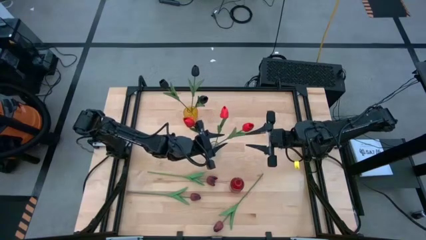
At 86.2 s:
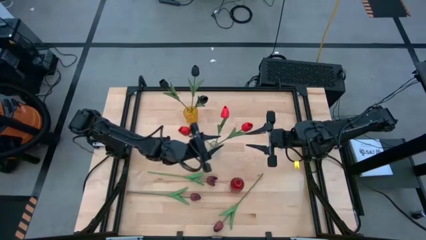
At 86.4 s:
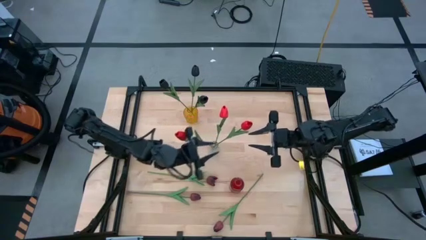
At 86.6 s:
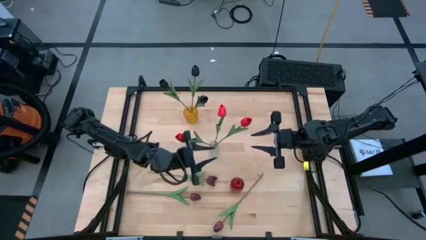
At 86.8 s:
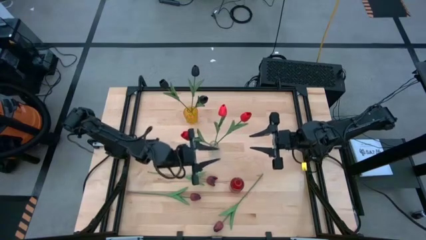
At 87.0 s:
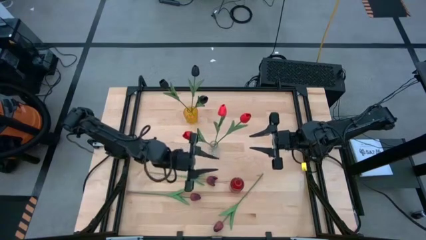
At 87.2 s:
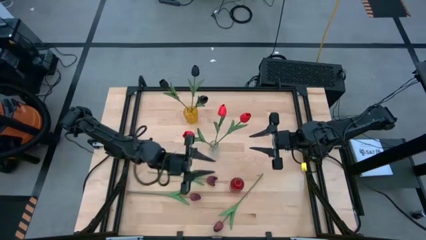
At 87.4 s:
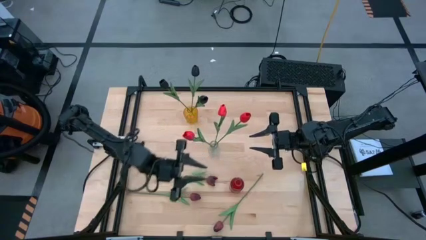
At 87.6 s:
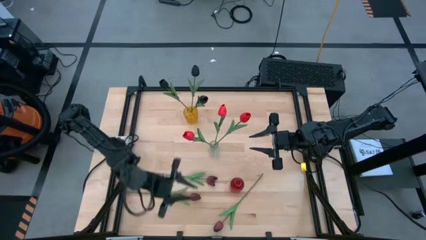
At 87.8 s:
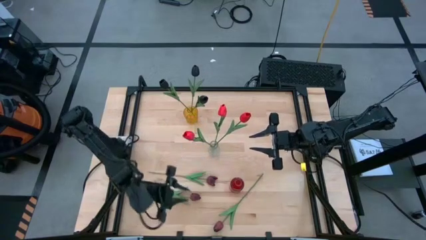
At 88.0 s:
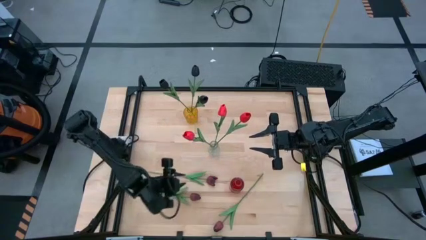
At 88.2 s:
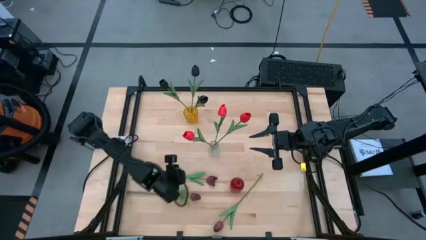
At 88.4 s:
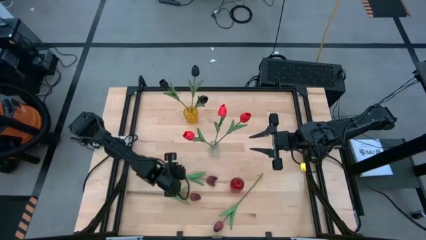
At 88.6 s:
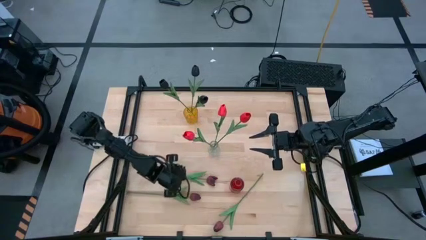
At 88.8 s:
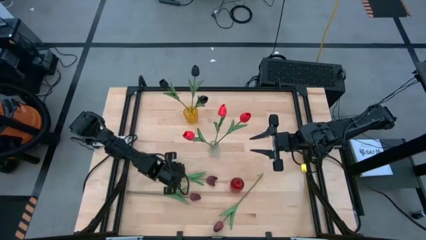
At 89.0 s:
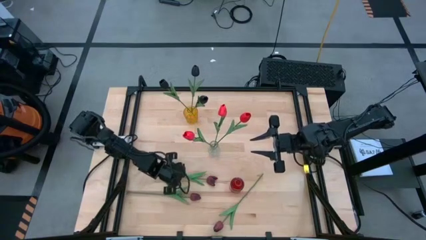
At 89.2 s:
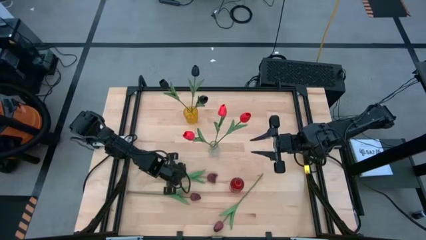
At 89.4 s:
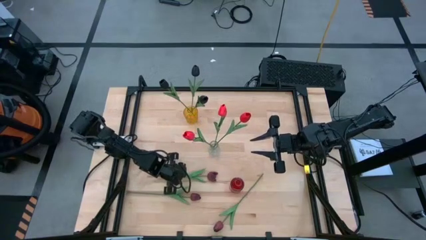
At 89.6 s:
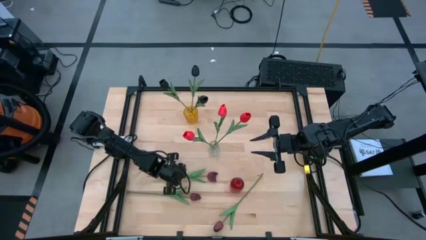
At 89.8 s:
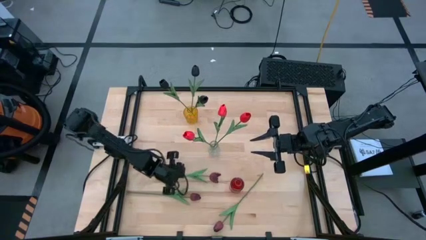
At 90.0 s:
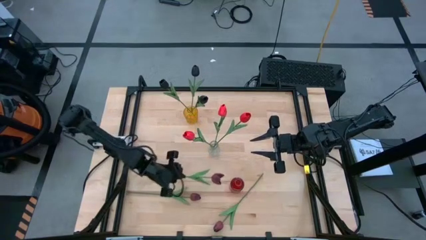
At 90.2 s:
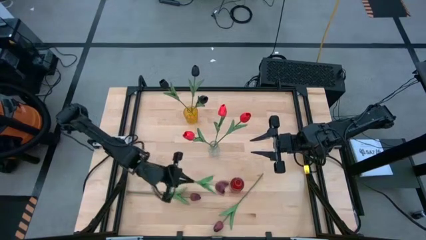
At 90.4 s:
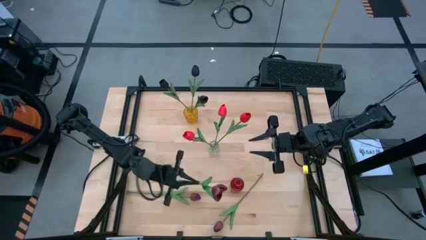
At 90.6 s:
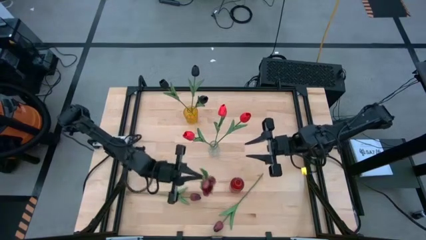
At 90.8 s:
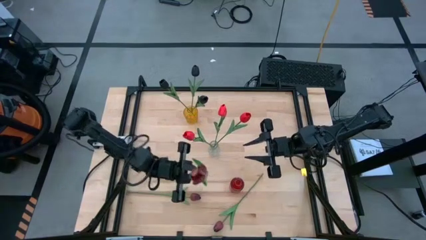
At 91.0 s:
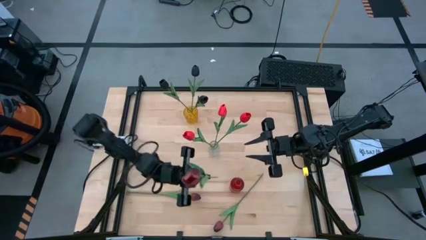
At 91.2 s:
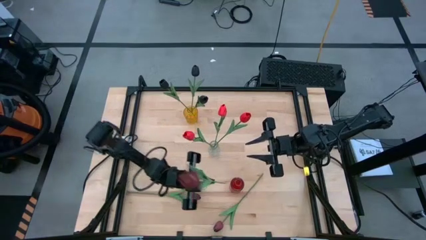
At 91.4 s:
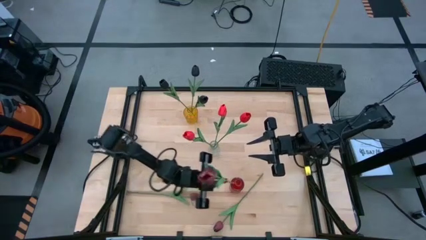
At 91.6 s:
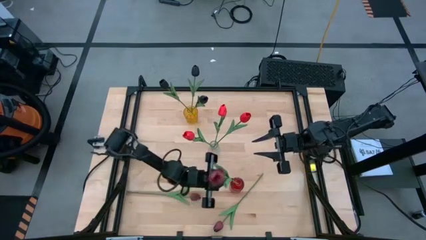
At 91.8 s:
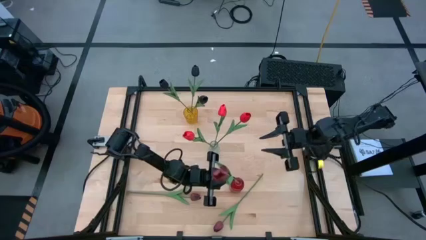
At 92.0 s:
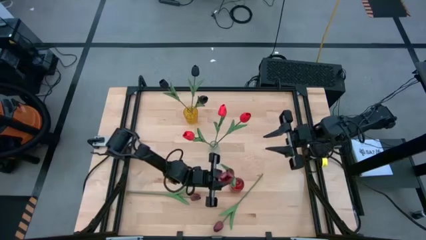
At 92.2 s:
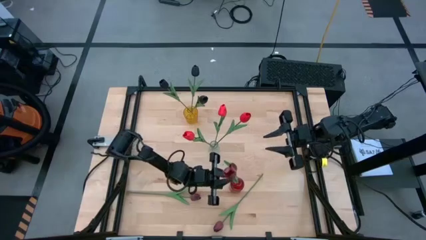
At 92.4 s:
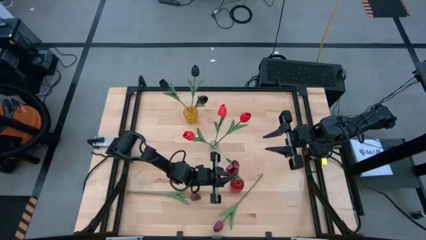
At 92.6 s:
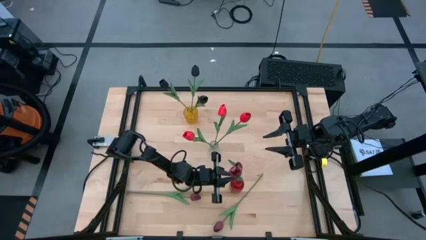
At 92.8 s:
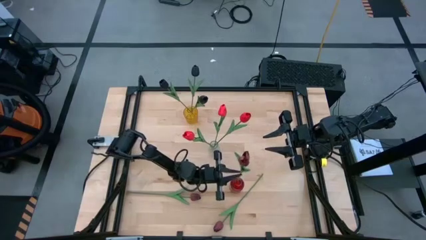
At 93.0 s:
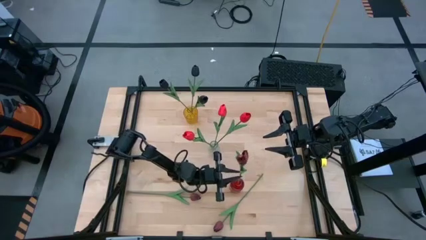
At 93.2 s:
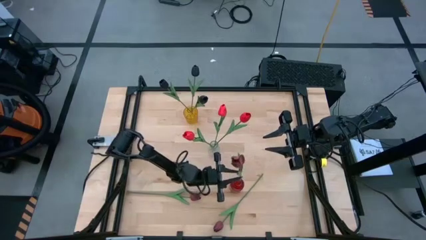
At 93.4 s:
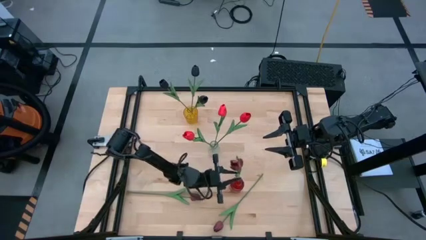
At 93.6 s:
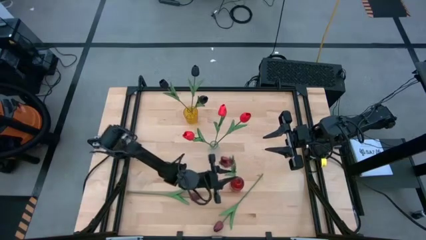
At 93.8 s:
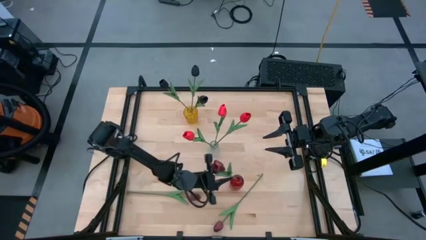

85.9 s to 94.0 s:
Task: Sort flowers into vase by color
Put the top left dark red tulip into the red vase

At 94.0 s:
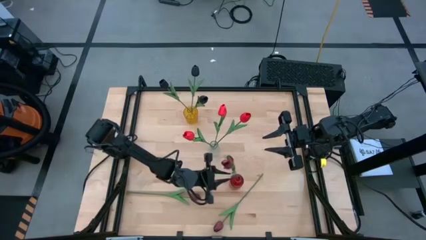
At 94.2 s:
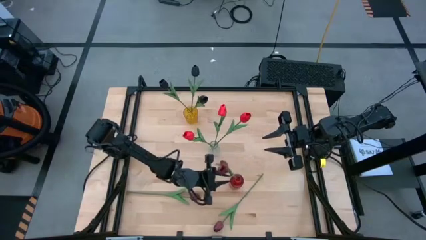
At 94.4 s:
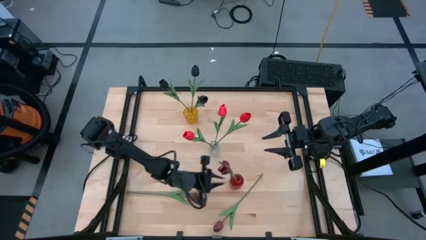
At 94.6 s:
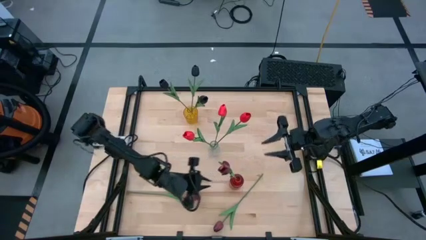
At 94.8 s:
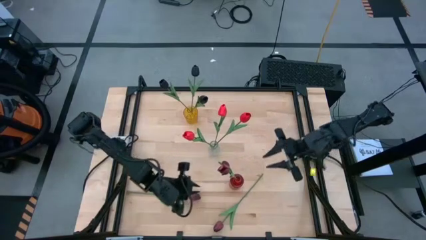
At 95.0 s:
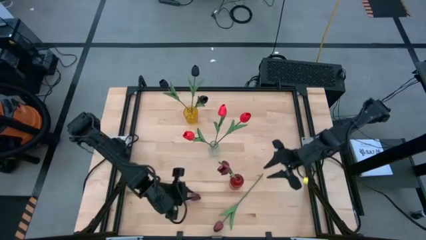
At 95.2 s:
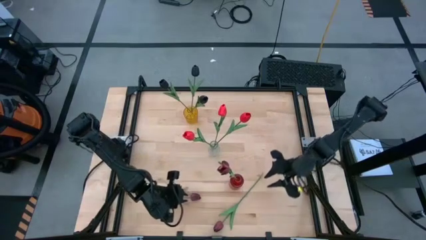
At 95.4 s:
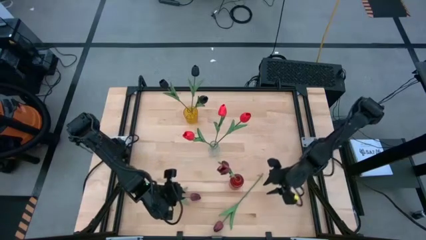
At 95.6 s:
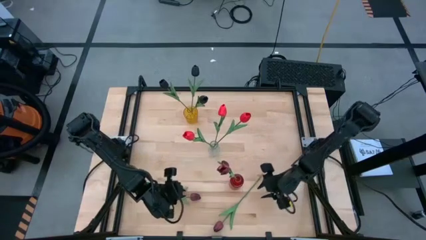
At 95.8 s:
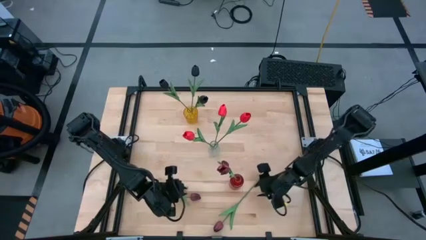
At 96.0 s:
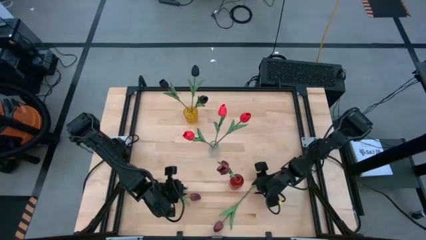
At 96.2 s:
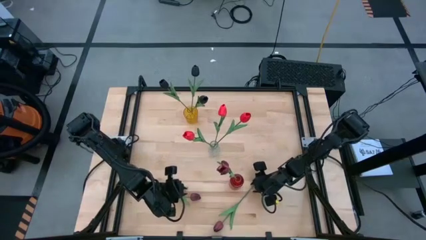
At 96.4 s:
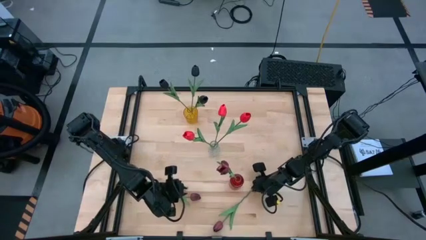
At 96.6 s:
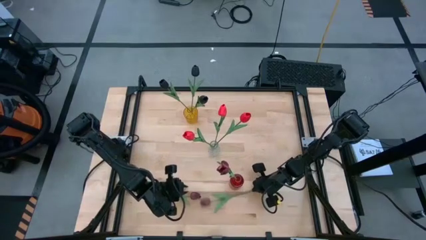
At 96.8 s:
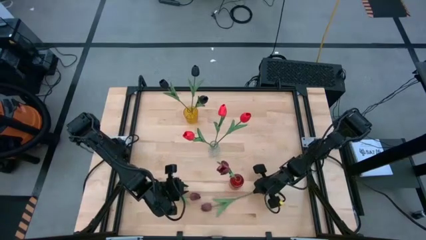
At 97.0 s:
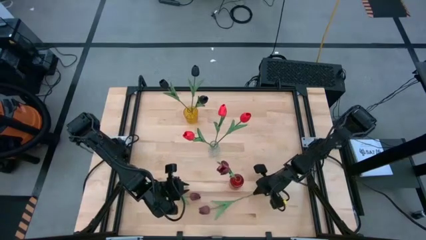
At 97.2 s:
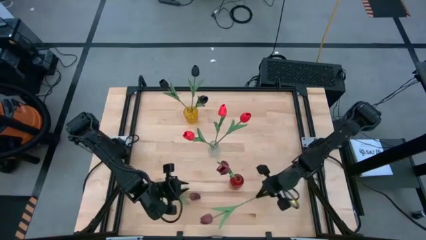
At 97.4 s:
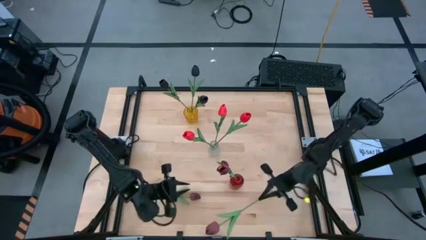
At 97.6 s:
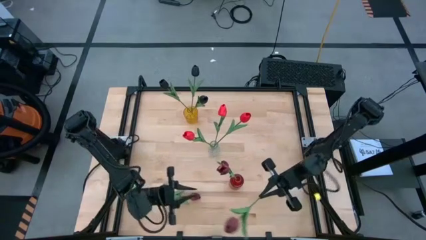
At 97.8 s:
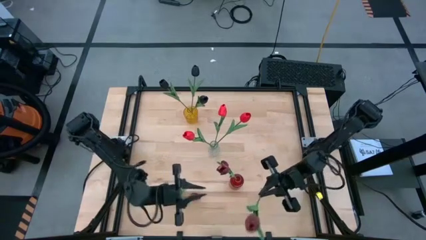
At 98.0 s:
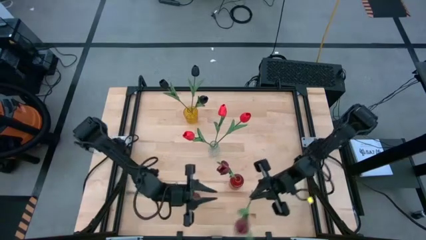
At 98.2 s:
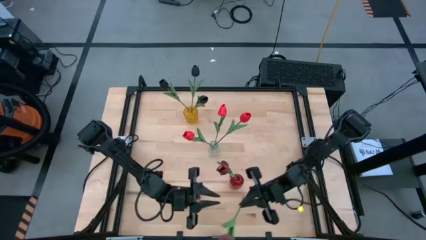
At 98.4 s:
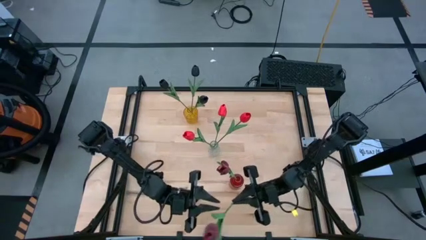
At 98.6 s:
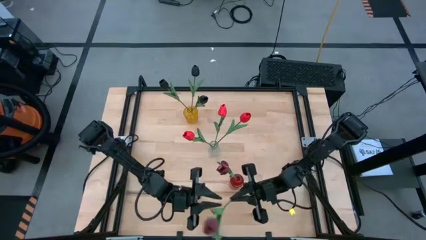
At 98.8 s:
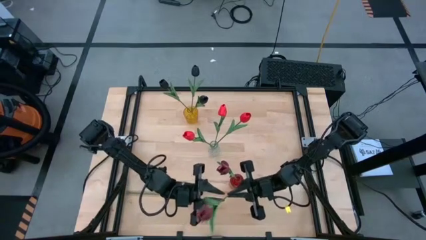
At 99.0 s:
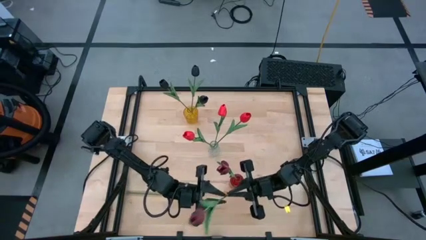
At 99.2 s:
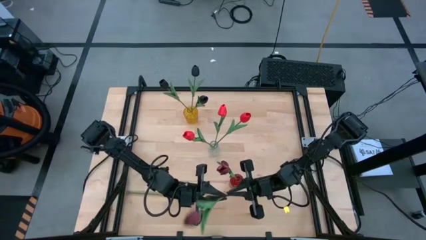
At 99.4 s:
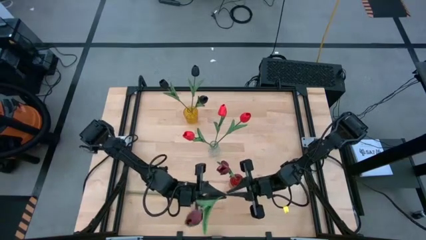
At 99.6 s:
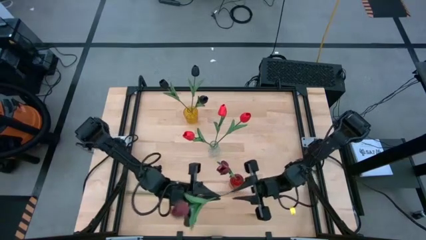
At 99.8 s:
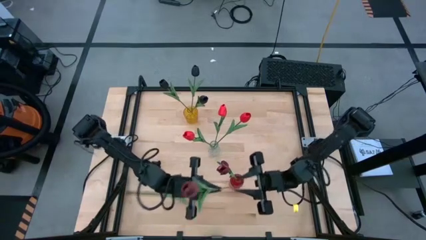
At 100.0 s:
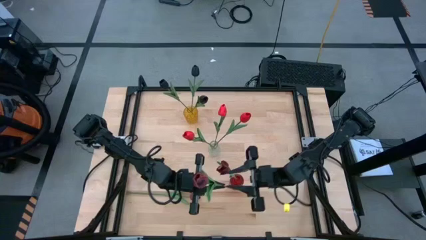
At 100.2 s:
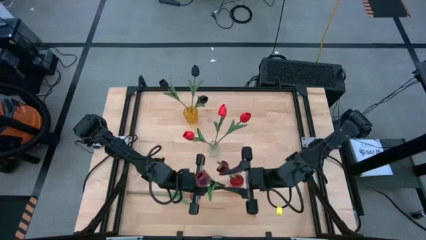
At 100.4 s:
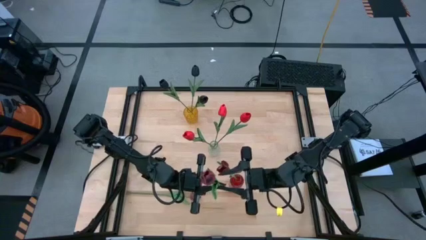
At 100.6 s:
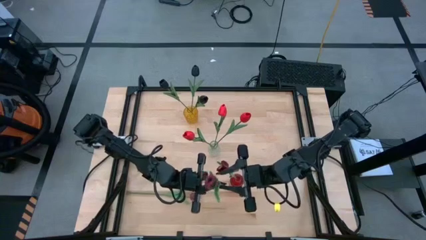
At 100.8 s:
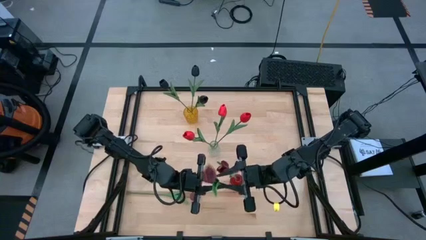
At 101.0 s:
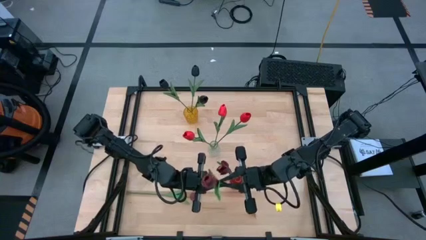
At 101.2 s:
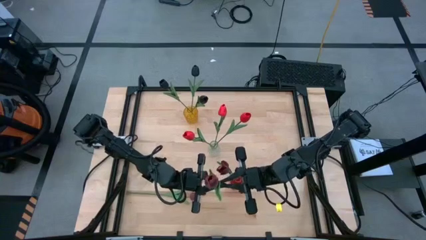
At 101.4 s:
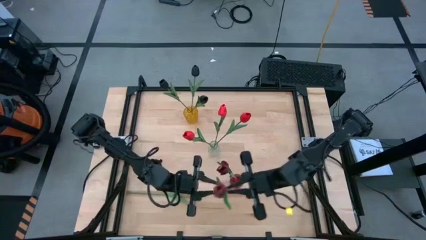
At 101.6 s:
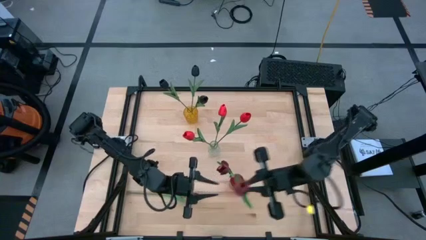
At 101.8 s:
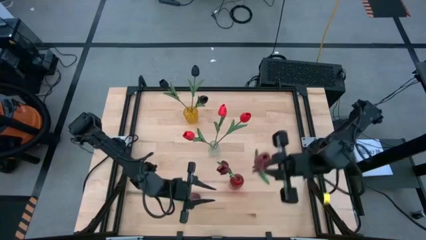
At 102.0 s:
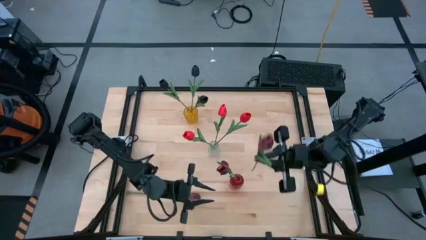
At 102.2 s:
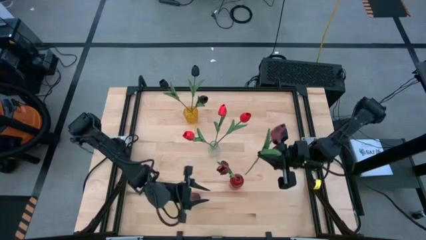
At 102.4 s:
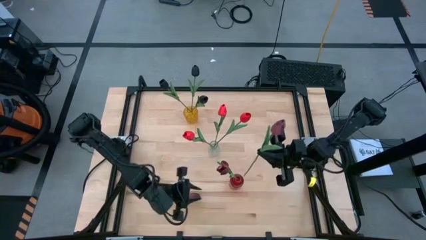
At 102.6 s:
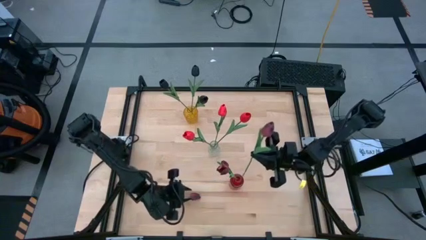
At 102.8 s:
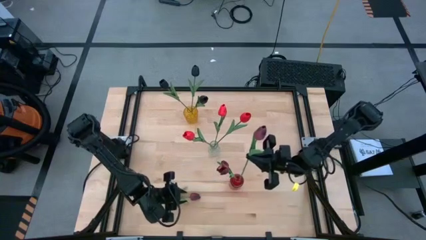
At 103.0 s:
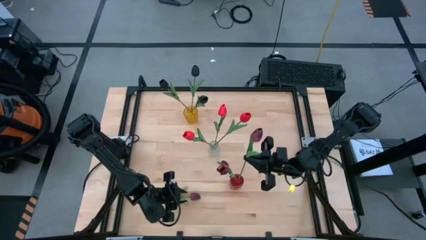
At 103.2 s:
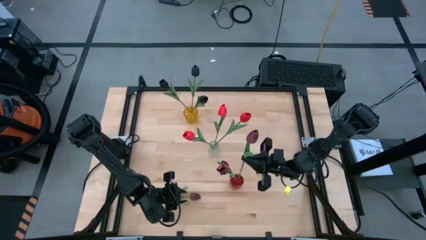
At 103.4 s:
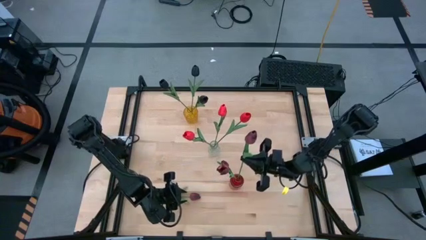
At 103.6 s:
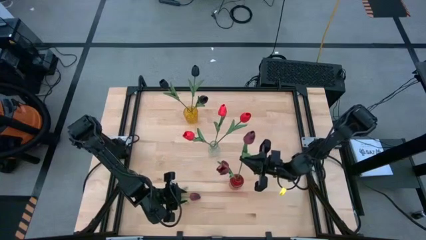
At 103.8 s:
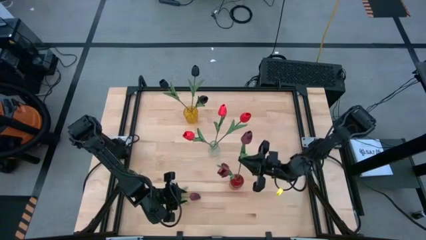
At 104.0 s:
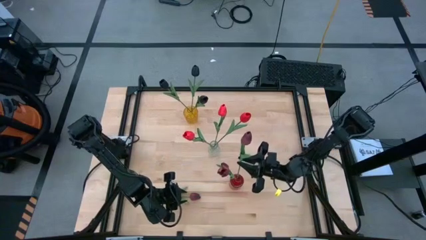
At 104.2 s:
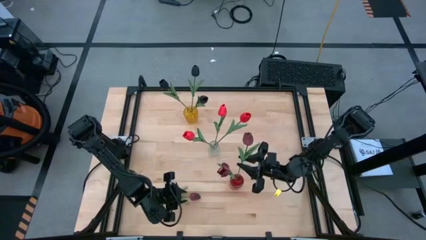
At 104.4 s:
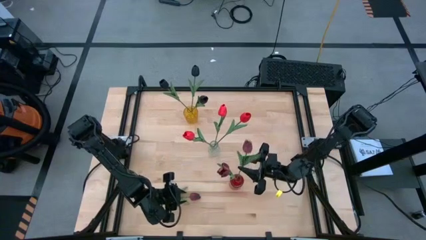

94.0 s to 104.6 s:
Put the right dark red tulip into the red vase
